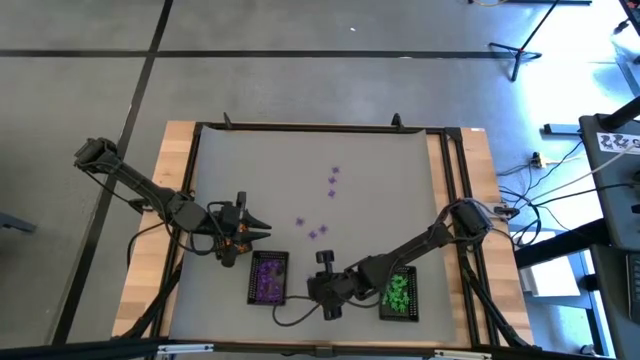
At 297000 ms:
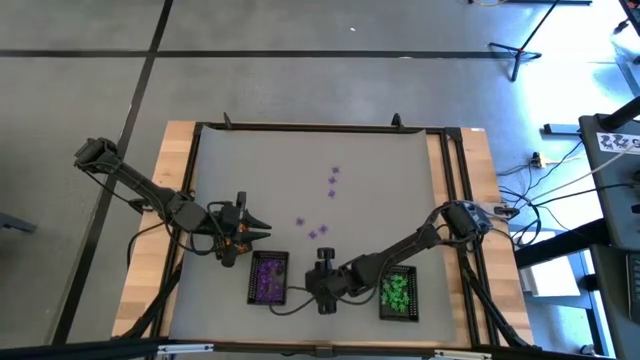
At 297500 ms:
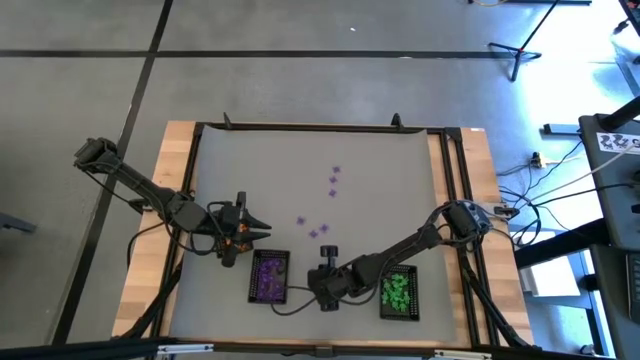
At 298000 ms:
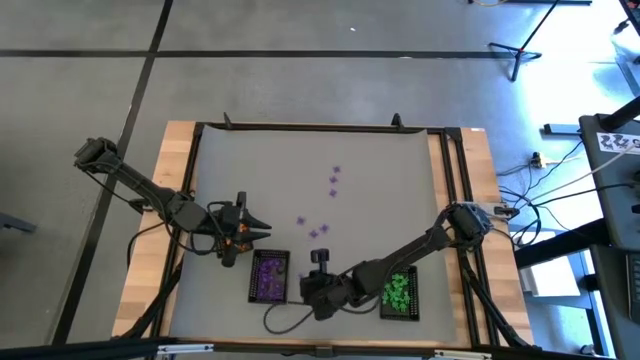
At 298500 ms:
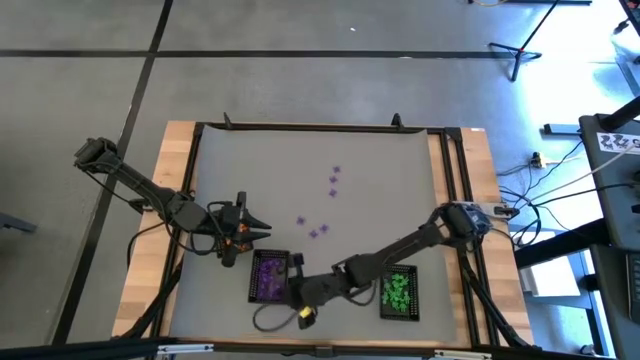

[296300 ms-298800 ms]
Task: Sort Halloween decoration
Put the purple spider toy into the bottom left black basket

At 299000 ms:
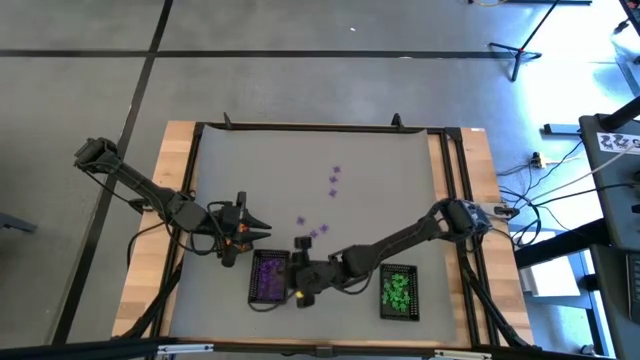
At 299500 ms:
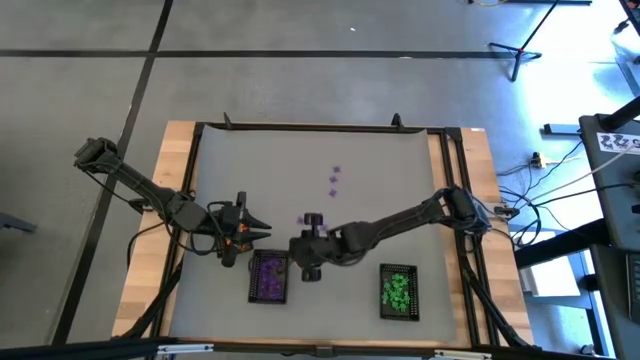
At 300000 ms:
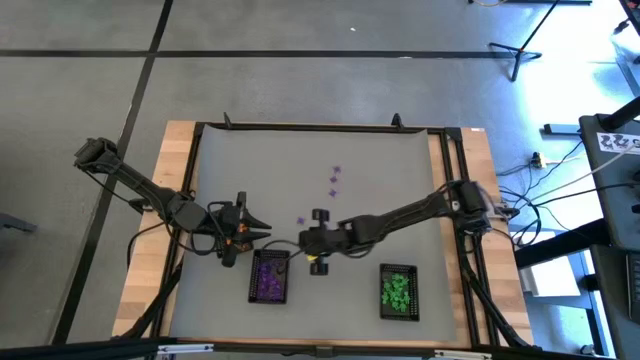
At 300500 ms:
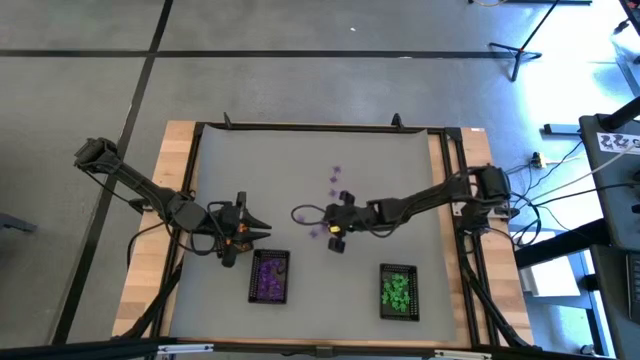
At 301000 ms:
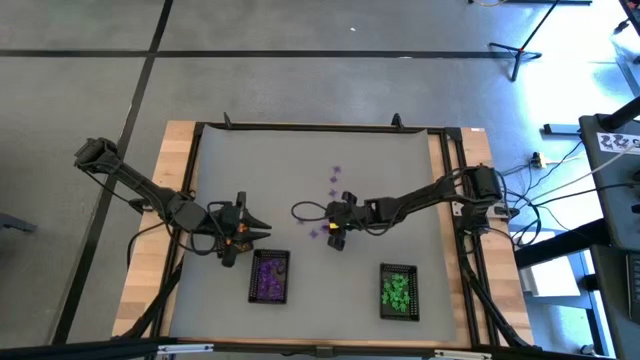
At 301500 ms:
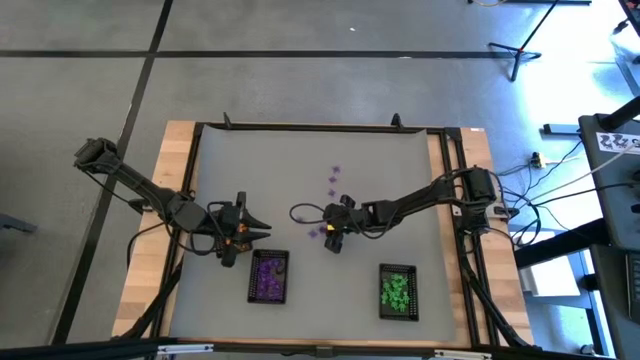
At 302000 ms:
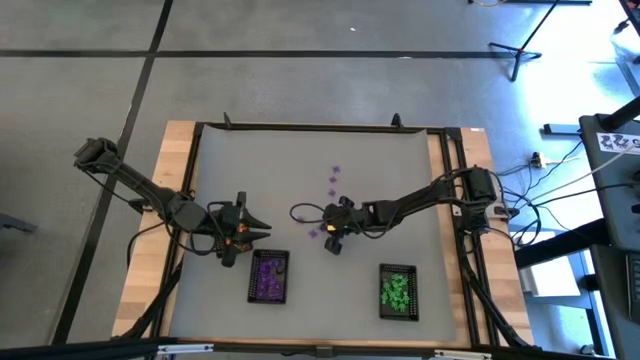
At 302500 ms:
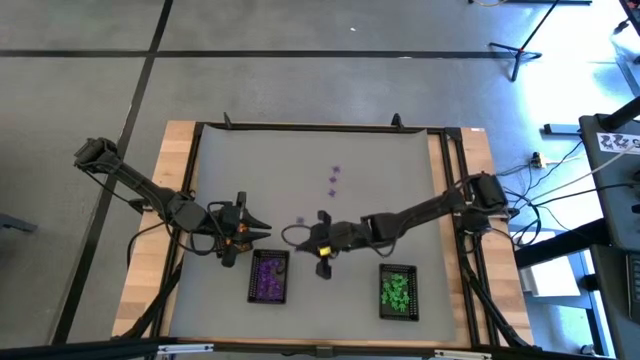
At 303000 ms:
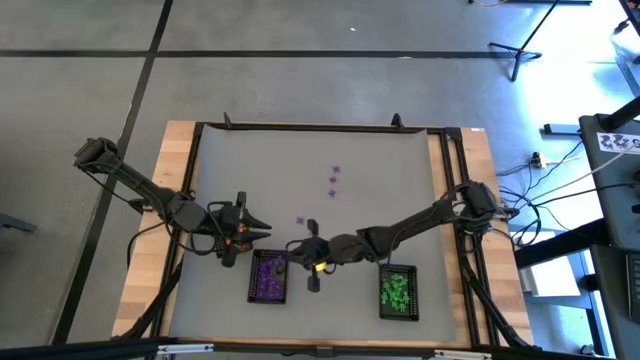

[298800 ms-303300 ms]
Put the purple spider toy into the bottom left black basket

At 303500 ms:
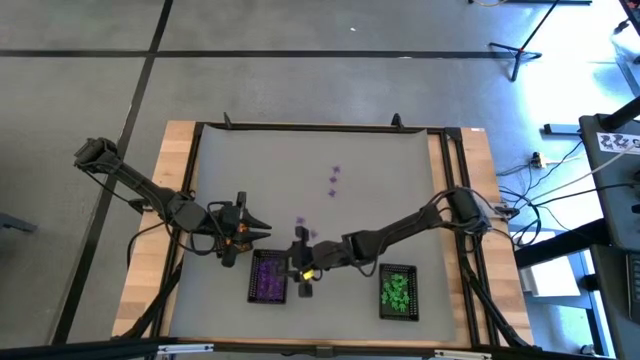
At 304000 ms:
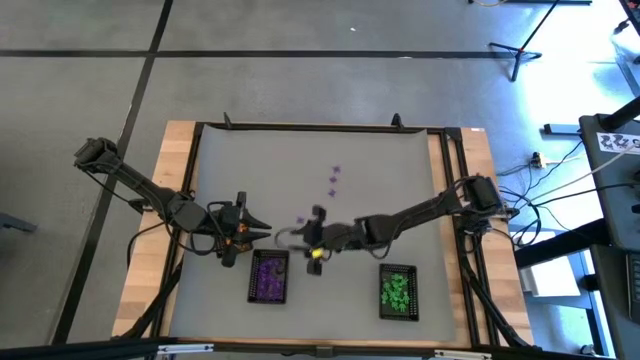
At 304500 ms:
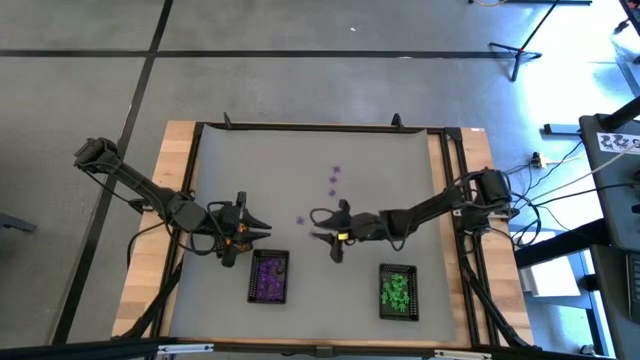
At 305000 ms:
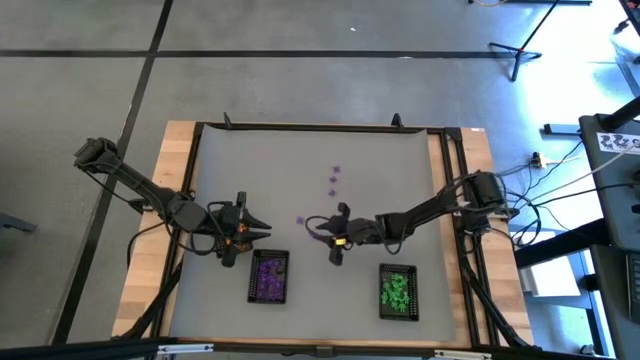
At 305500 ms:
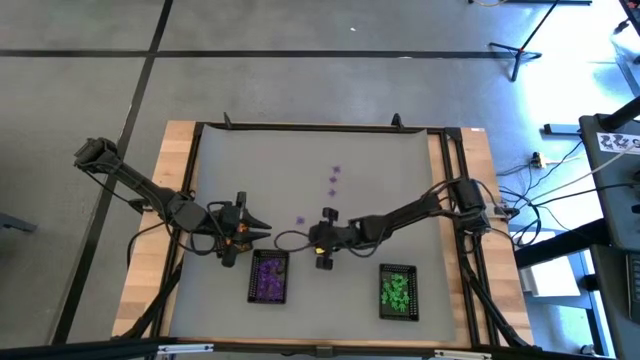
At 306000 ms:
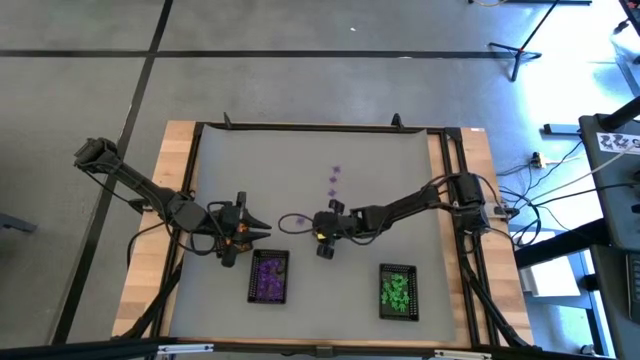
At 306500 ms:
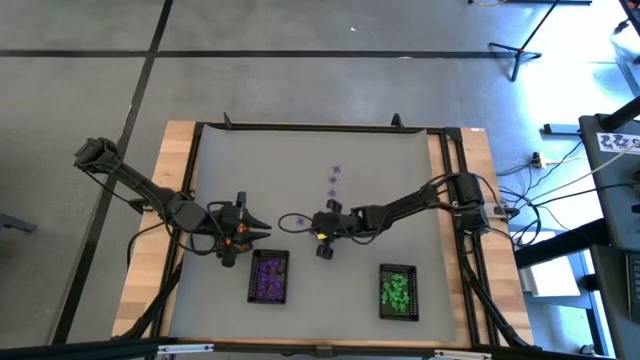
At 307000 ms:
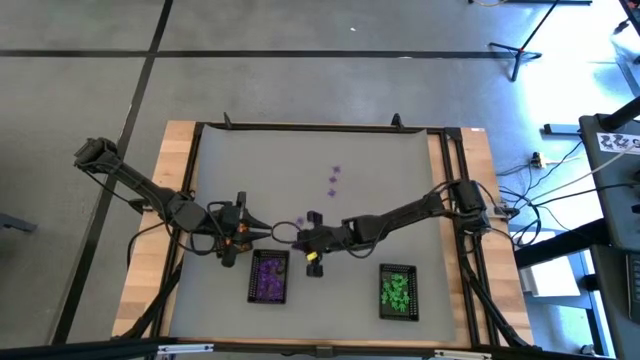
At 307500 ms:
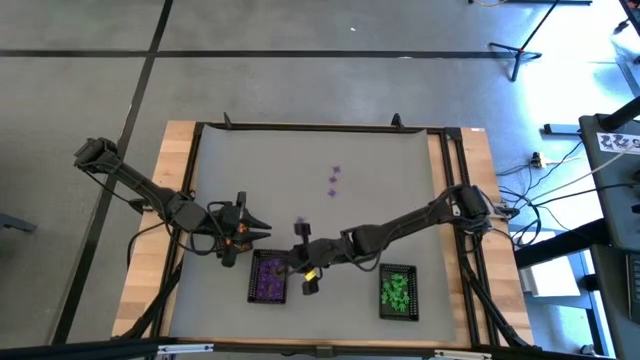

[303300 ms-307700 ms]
Put the purple spider toy into the bottom left black basket

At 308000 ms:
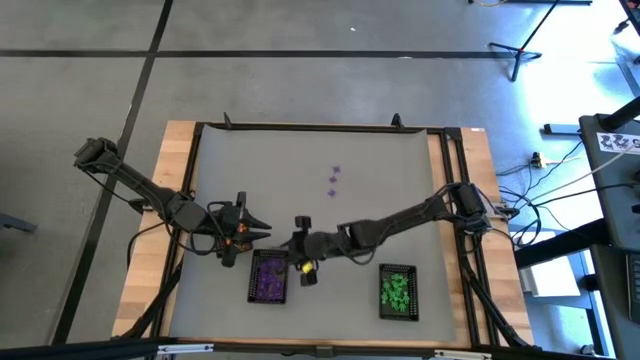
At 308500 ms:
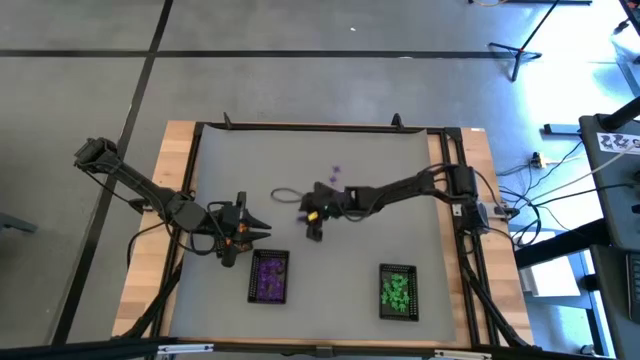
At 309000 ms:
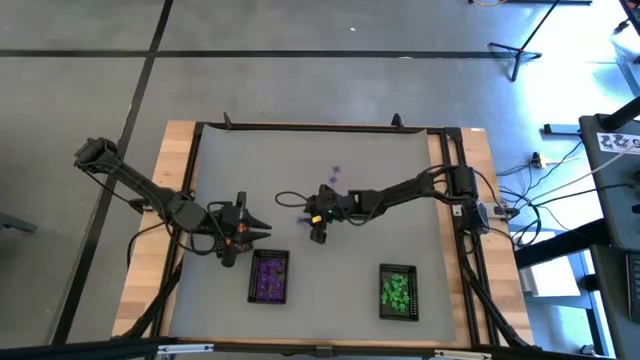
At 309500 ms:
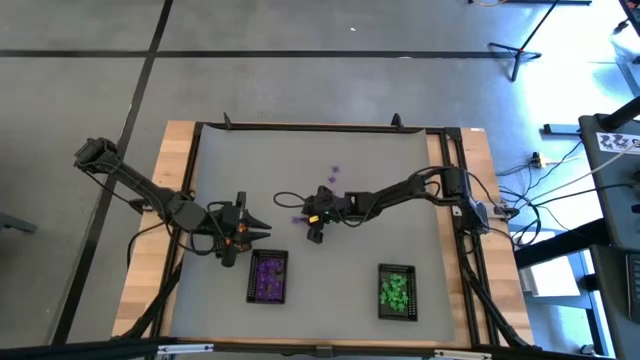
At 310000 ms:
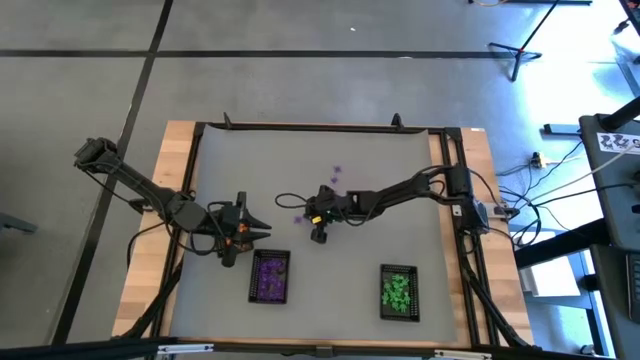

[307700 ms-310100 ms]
Put the purple spider toy into the bottom left black basket

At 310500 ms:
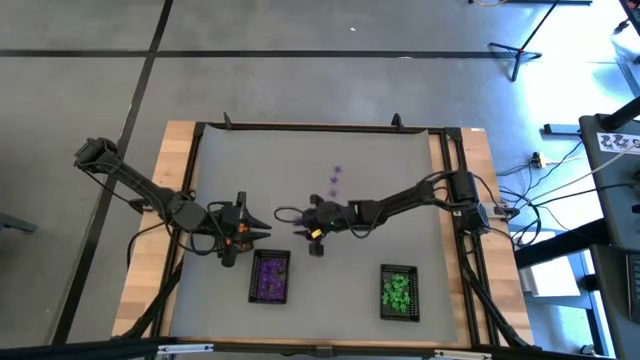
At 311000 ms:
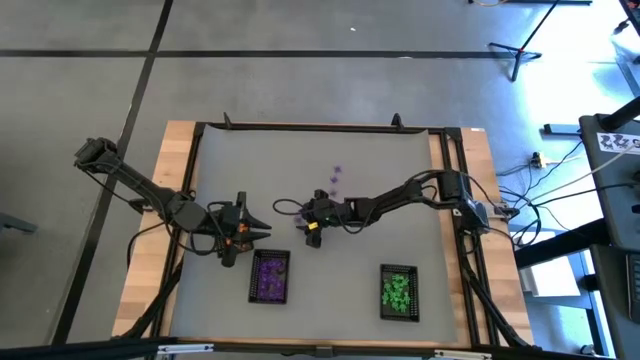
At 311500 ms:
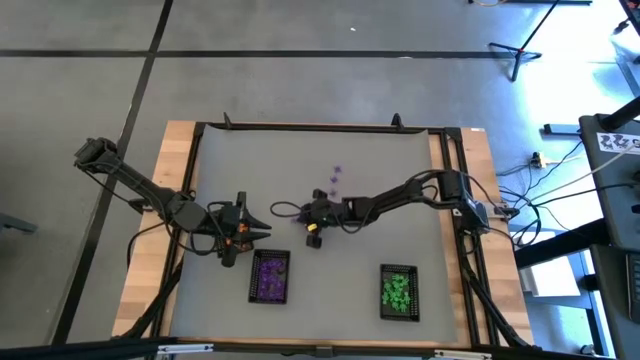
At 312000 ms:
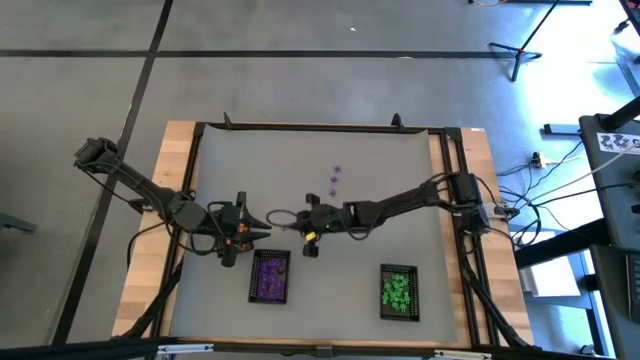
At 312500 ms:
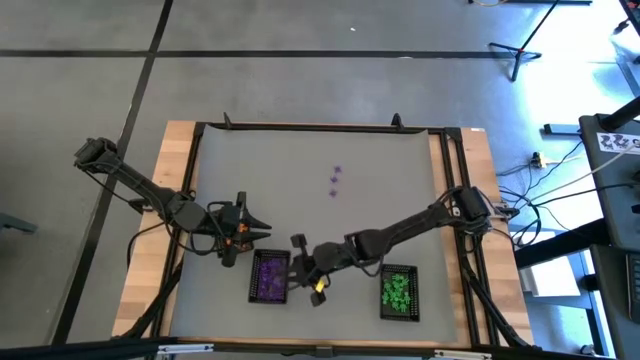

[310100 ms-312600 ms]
Put the purple spider toy into the bottom left black basket

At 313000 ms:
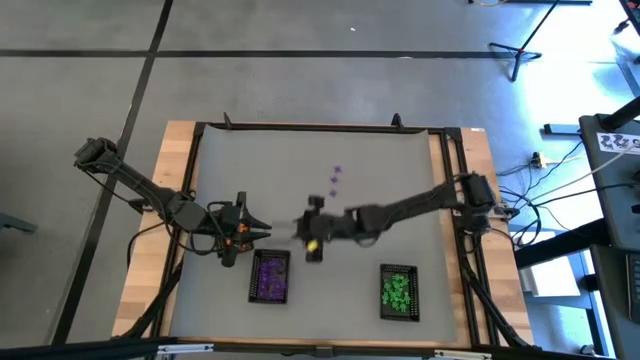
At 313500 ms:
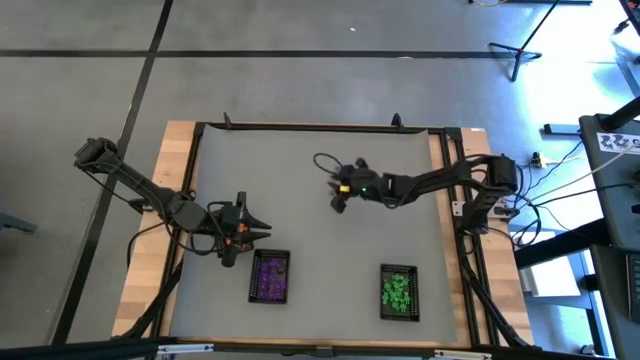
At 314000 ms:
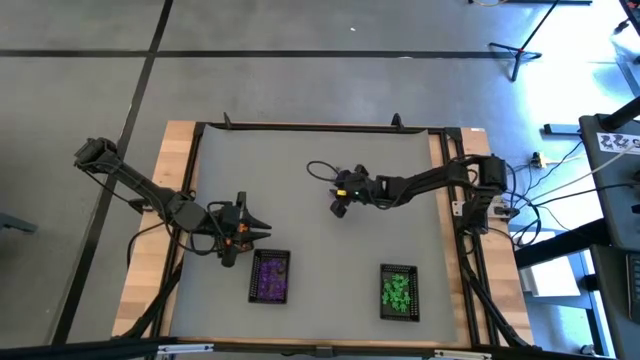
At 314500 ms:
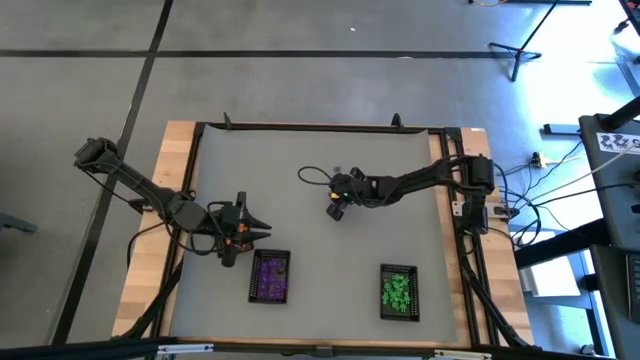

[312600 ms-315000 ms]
Put the purple spider toy into the bottom left black basket

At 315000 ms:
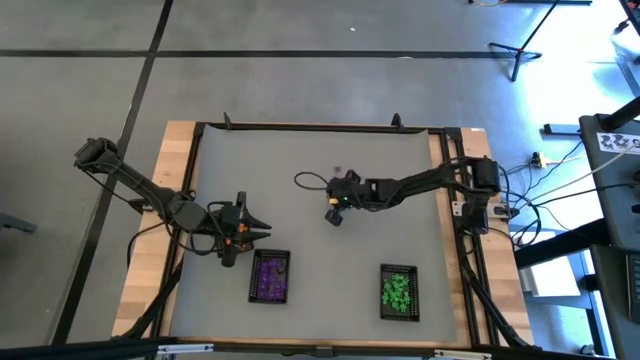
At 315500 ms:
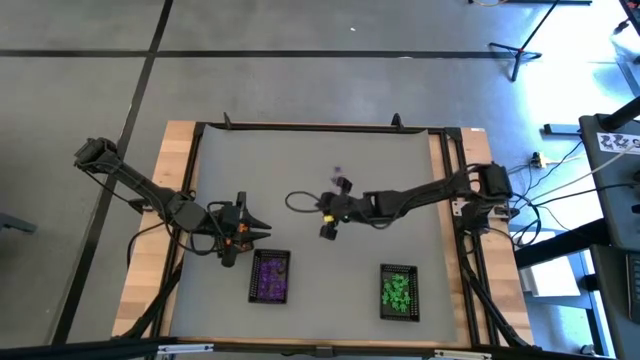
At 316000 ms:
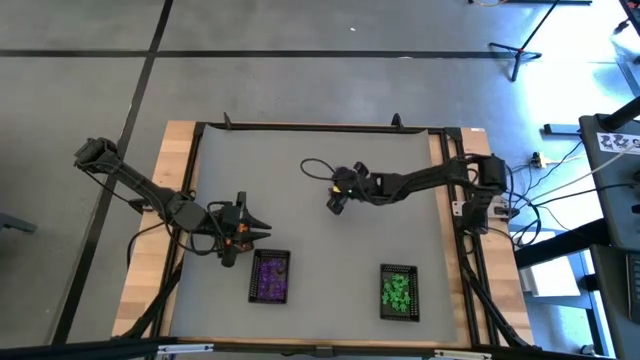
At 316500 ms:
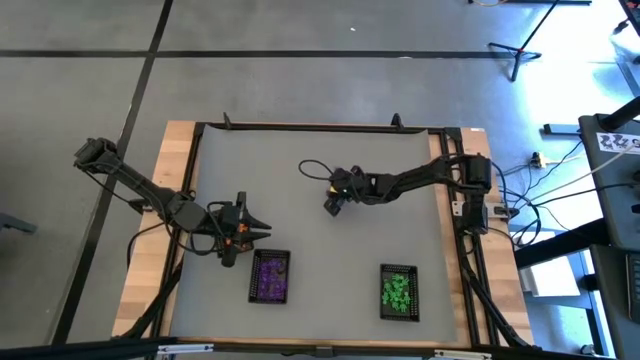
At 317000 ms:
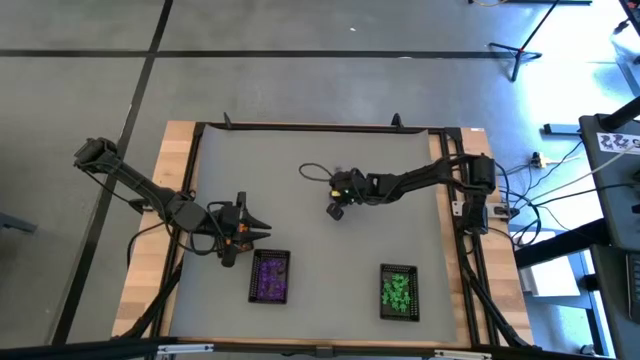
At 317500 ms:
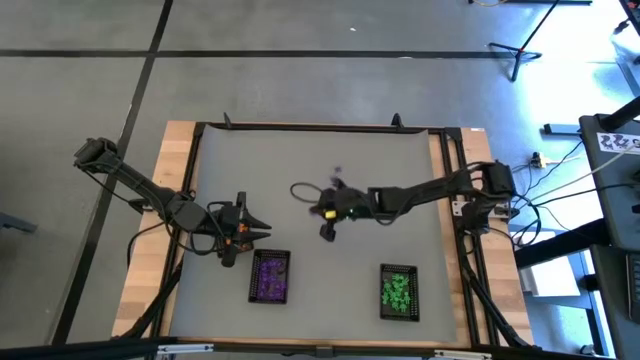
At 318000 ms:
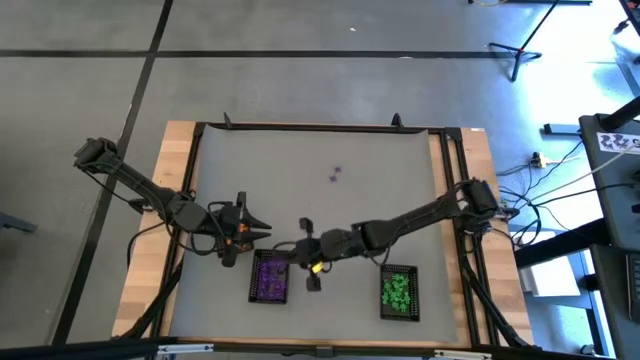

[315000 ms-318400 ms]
Put the purple spider toy into the bottom left black basket
